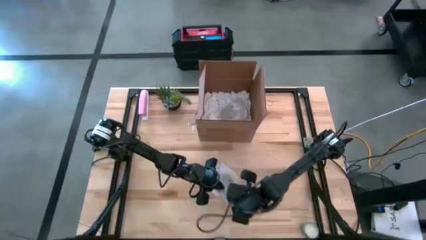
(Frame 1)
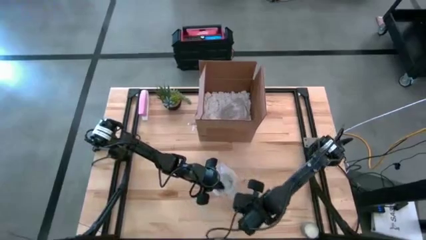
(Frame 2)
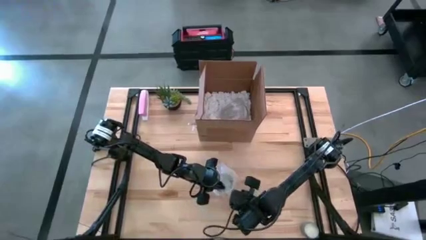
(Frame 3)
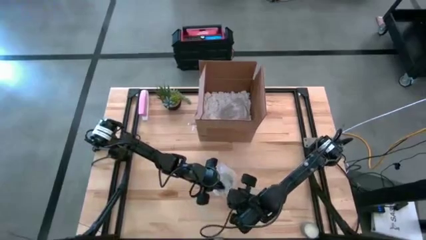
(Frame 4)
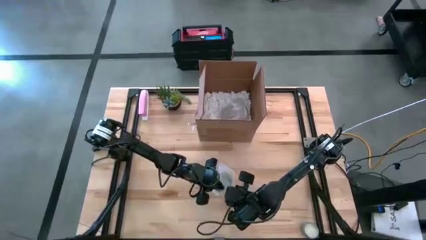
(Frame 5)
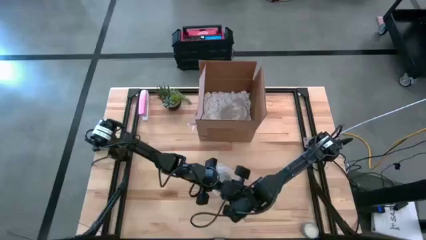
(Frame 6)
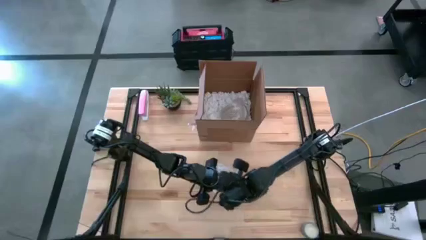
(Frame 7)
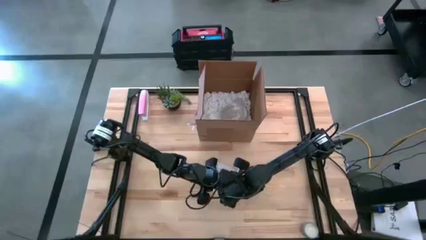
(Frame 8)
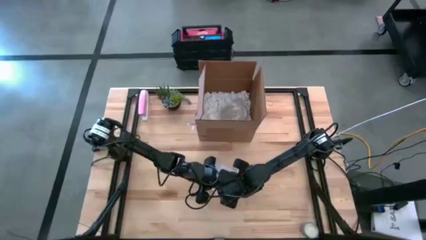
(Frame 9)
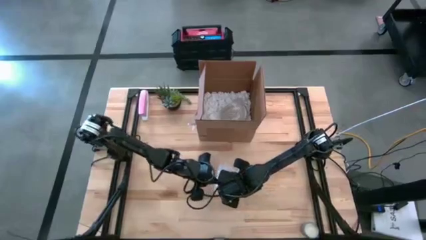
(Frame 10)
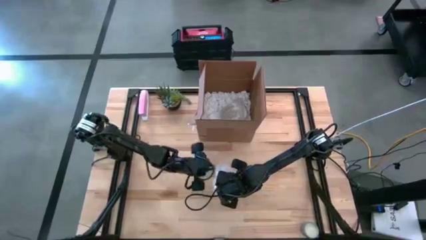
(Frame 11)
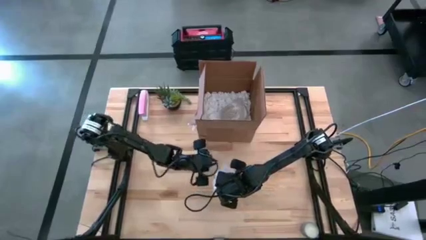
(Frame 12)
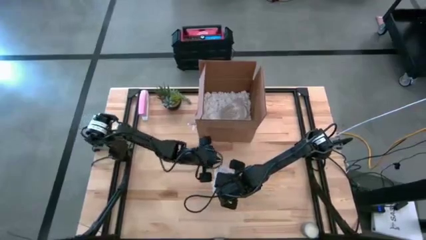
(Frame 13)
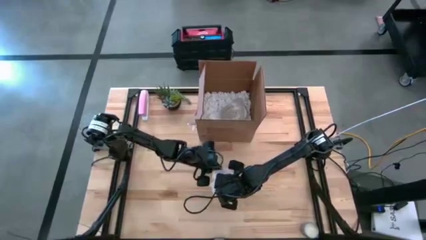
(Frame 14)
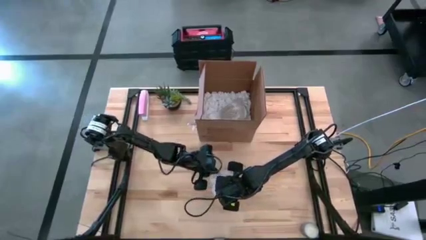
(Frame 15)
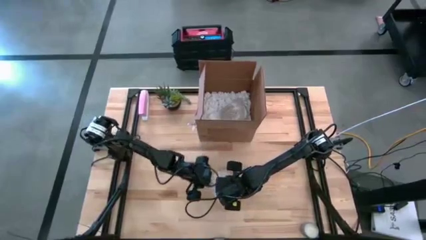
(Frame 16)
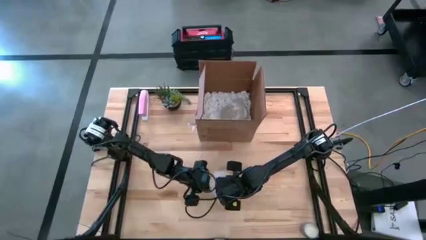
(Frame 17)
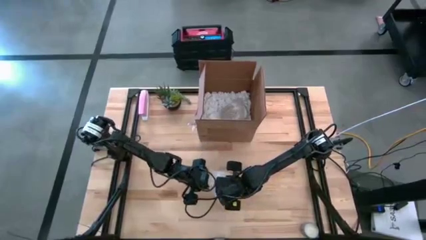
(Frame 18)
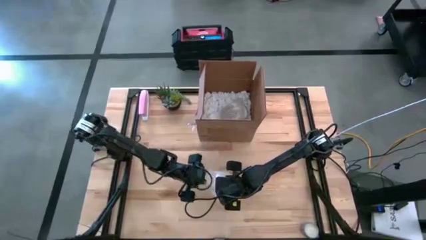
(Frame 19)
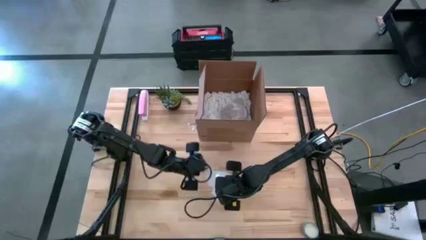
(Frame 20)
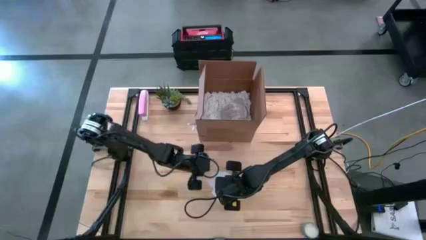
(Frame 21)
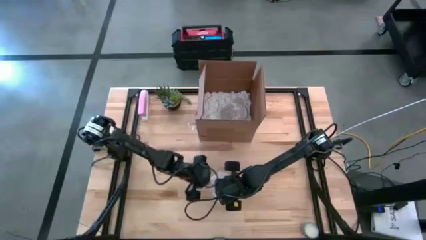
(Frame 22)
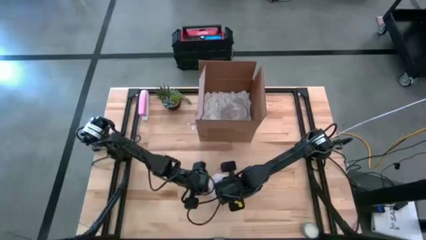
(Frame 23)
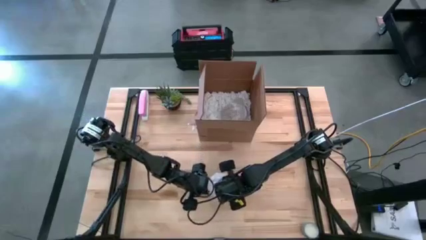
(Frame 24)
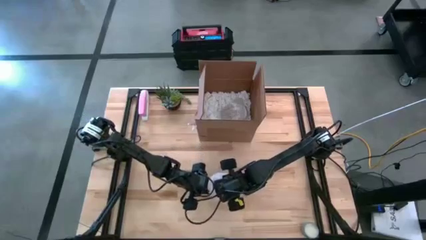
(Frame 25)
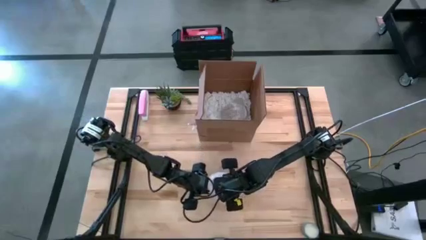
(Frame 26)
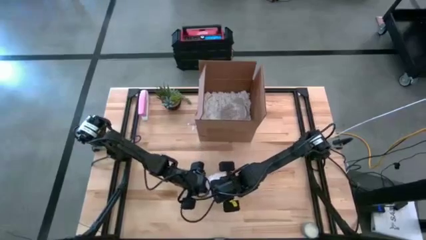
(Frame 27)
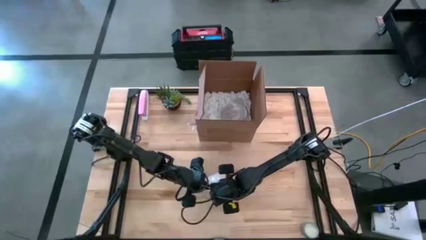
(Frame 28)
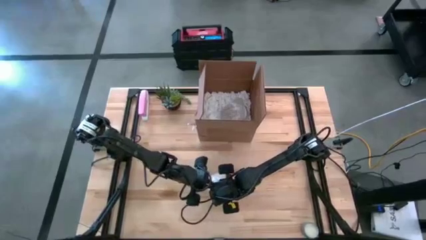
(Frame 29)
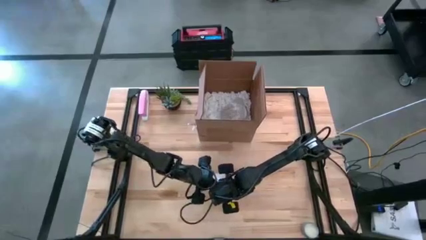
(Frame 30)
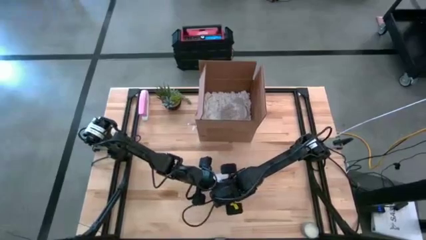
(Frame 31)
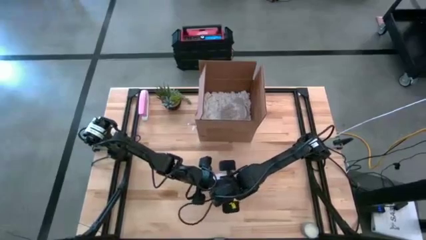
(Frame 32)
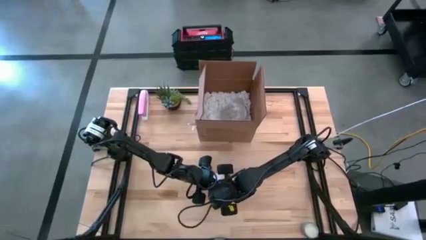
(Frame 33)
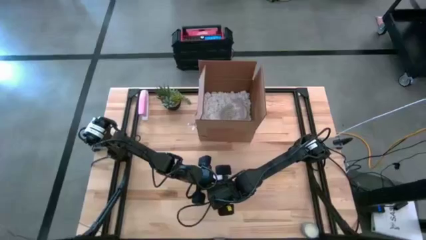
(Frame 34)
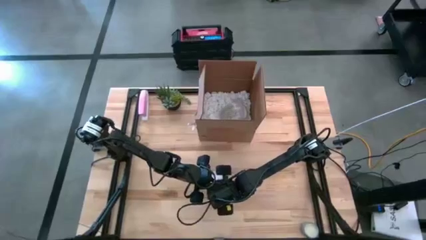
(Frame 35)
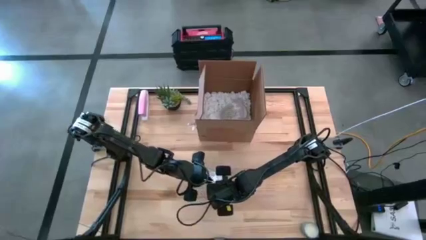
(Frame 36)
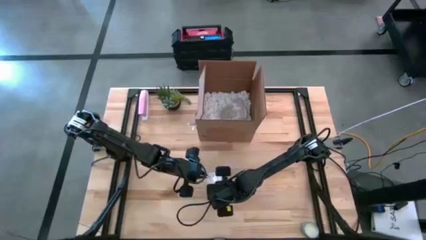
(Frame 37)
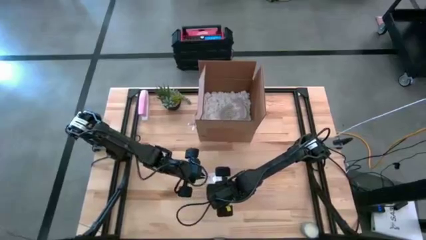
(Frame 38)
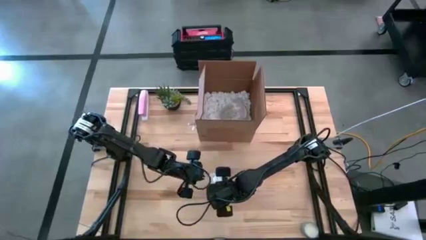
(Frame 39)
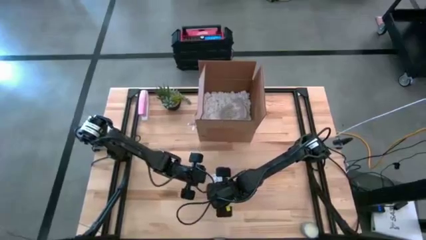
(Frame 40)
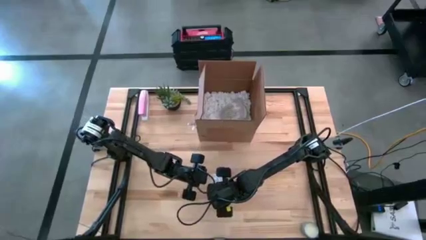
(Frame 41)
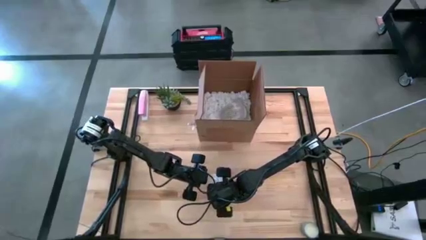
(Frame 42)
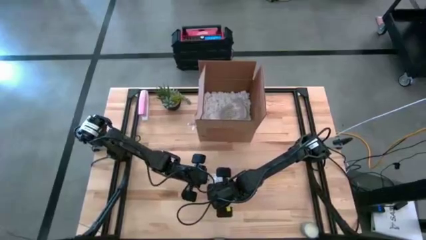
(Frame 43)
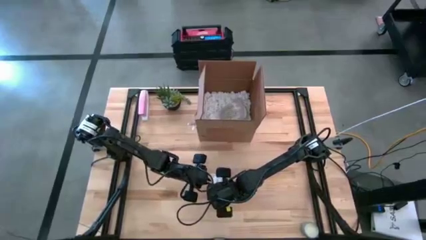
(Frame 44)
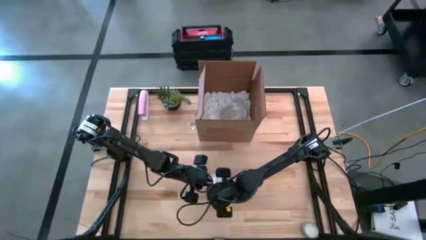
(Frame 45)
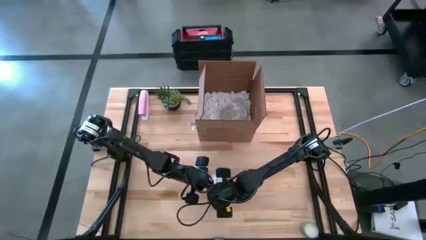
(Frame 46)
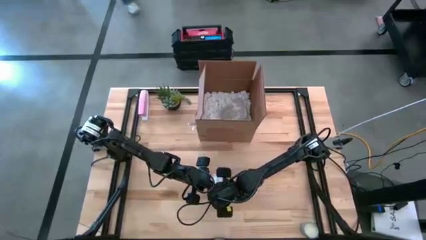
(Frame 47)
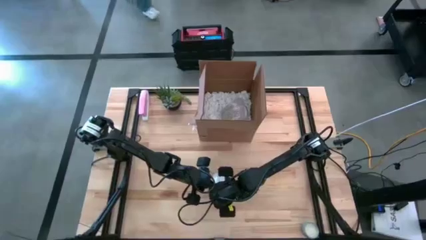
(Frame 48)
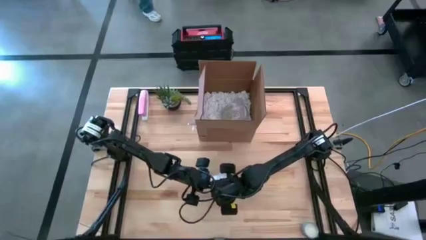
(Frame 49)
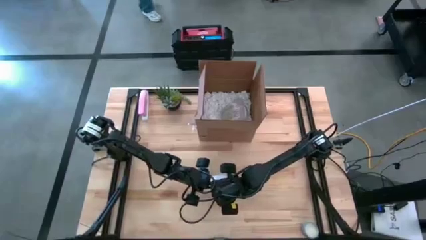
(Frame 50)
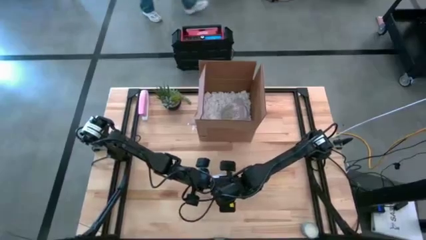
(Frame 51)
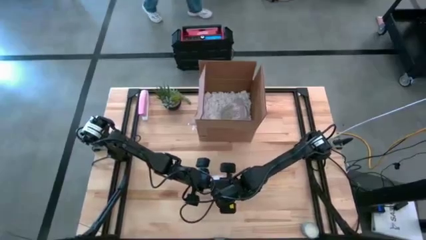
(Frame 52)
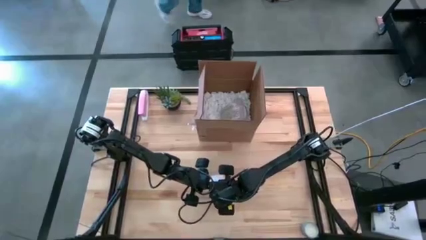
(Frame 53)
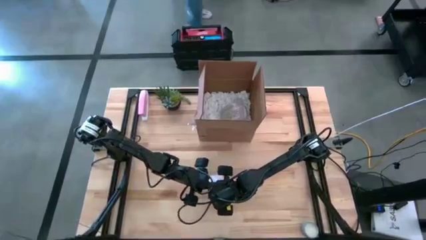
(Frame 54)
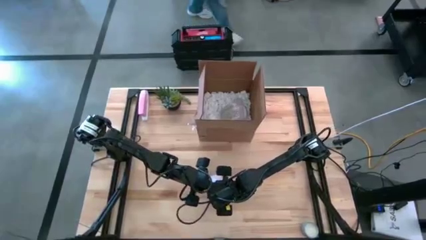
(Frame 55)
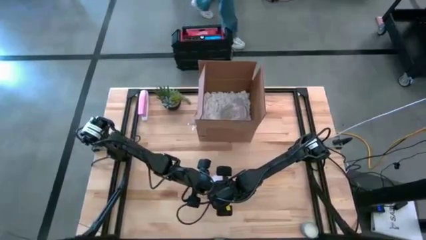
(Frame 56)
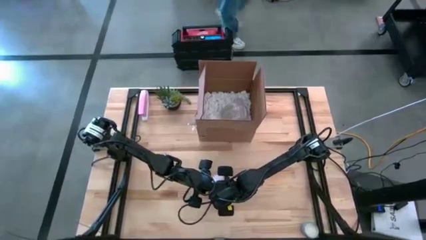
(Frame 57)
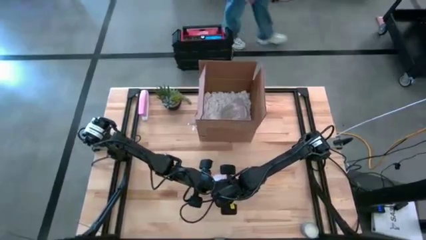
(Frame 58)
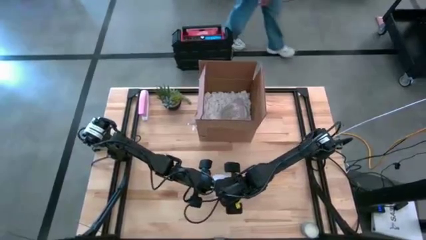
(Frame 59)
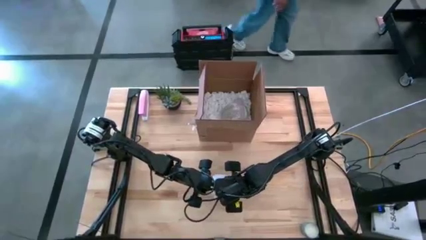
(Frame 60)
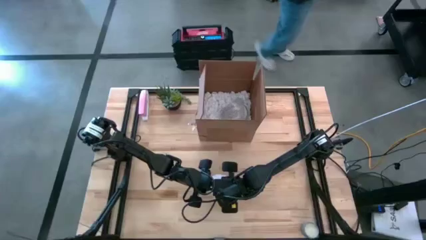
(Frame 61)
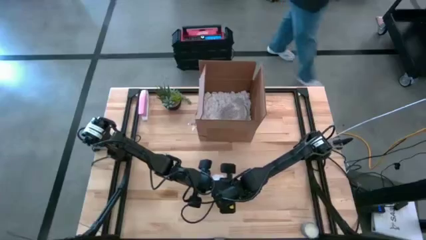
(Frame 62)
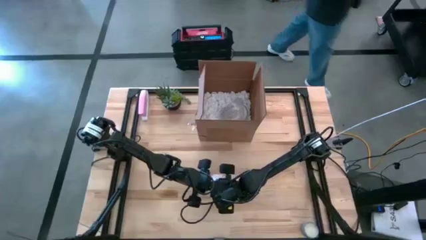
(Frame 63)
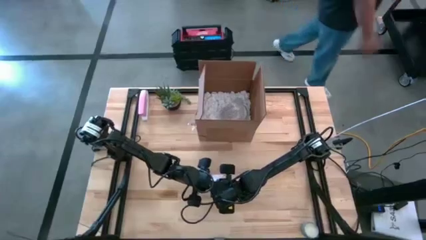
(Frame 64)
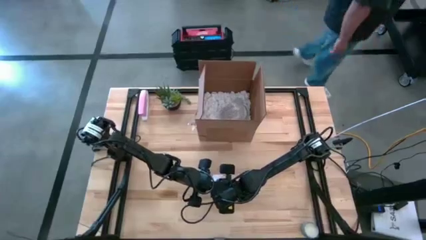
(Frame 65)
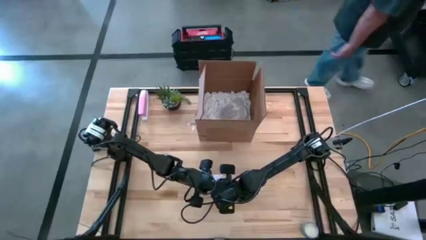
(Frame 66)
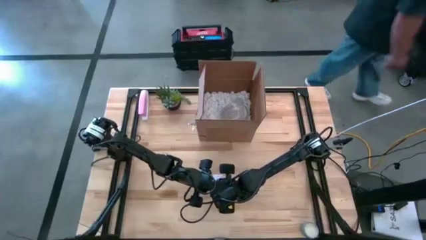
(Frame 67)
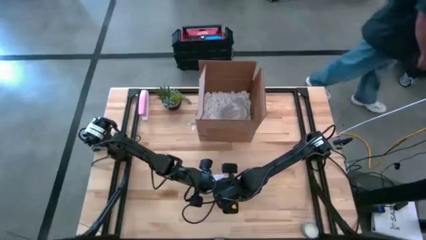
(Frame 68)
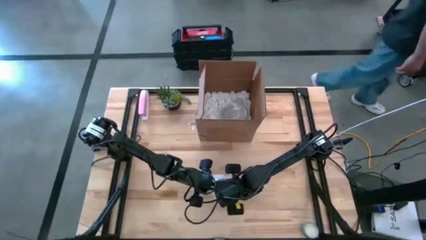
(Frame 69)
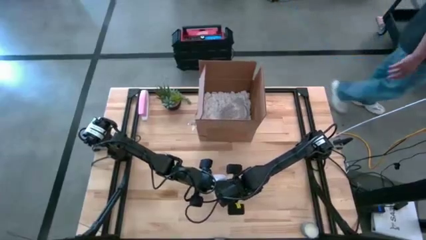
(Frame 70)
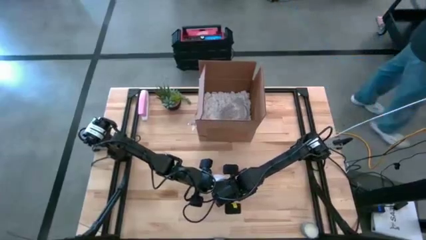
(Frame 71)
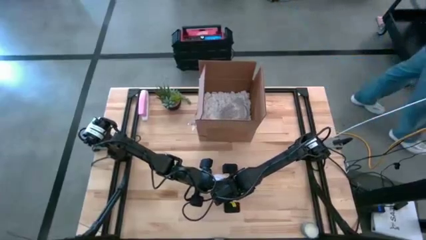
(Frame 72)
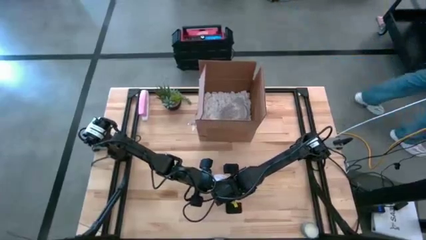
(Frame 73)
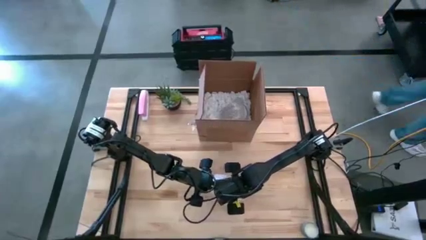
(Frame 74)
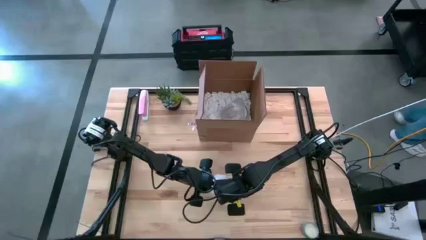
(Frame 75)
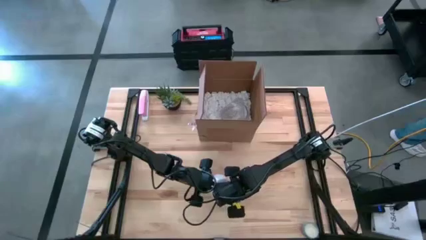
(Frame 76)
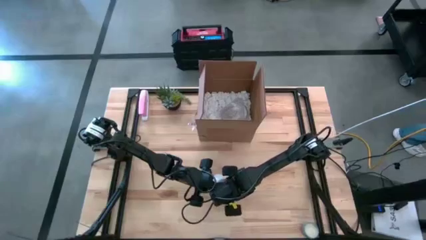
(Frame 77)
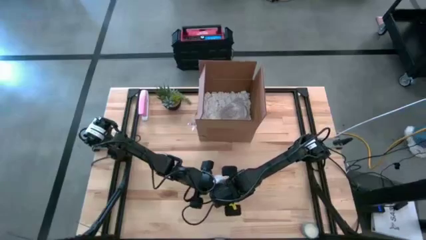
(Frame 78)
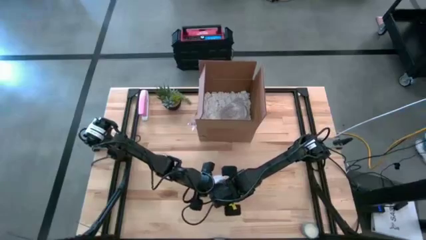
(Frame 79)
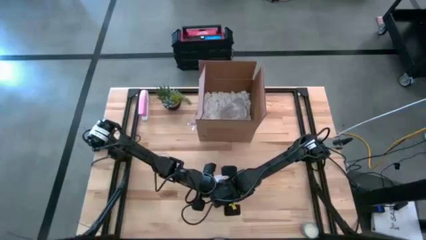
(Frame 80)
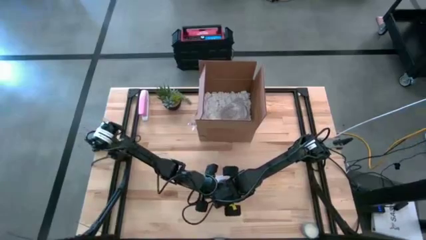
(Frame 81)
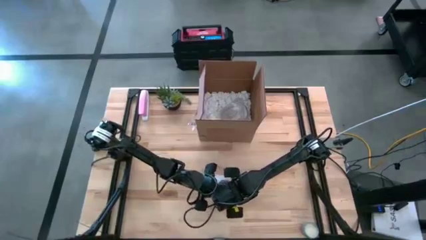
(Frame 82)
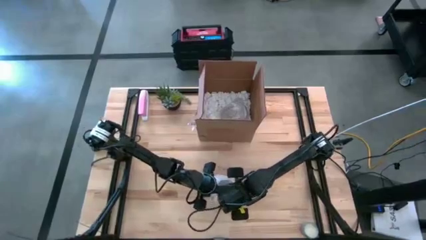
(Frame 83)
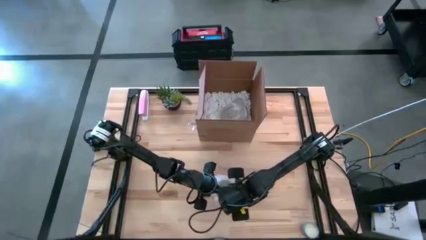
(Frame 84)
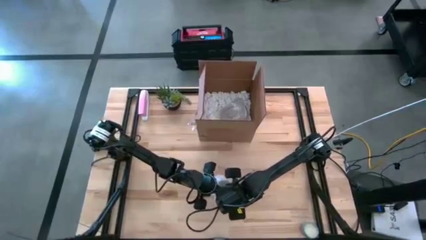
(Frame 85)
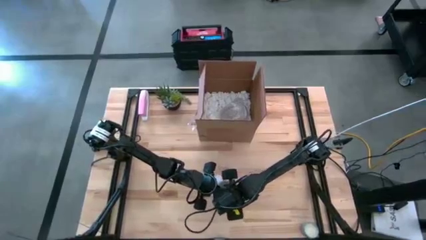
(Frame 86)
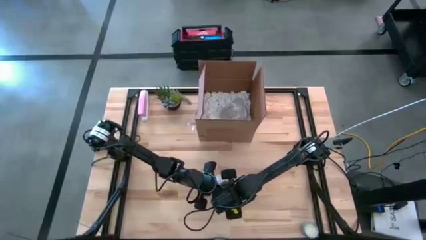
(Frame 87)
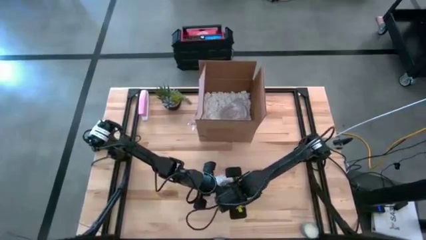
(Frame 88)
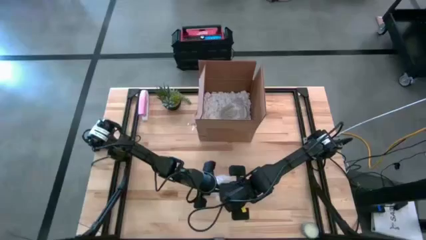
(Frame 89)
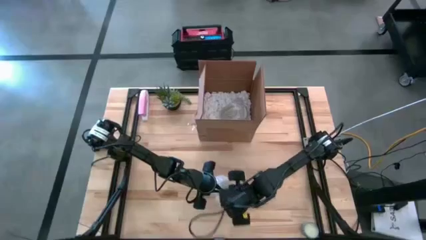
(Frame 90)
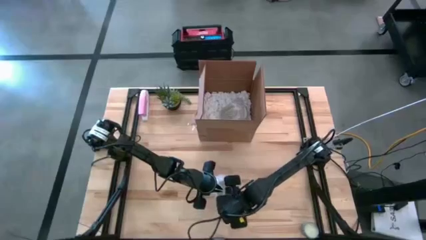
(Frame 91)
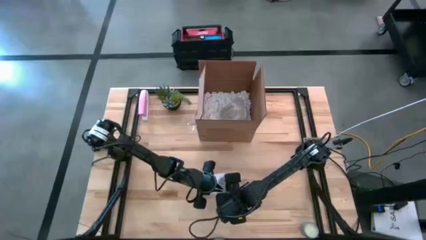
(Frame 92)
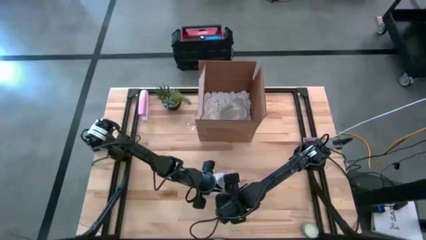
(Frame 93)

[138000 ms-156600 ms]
Task: wrap mug
Wrap the orange mug with bubble wrap
